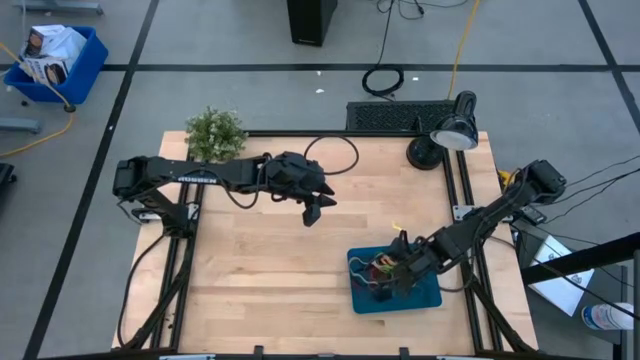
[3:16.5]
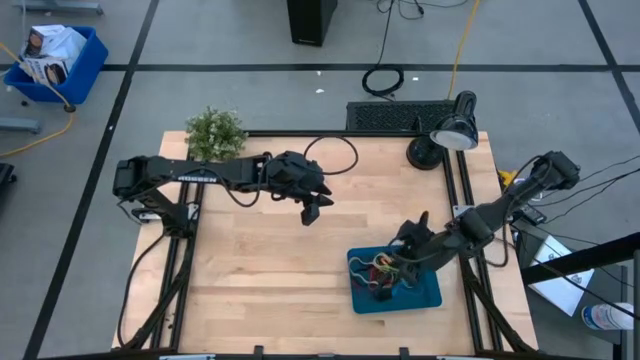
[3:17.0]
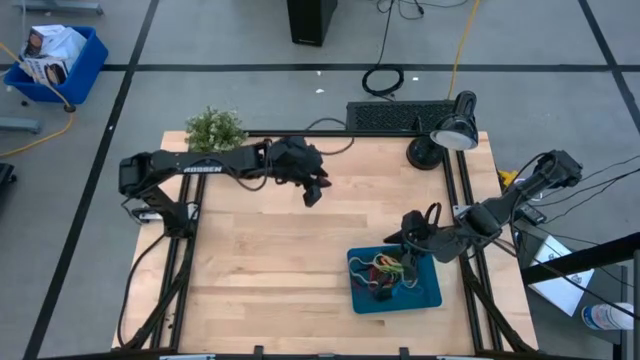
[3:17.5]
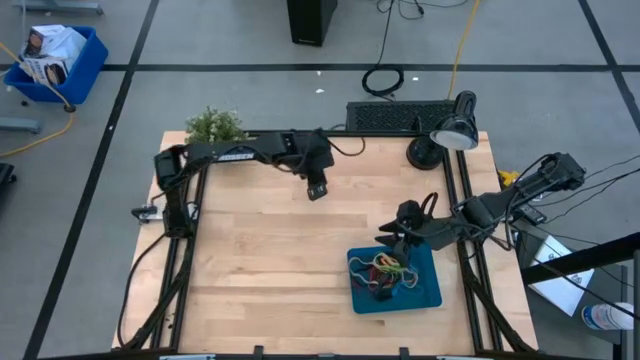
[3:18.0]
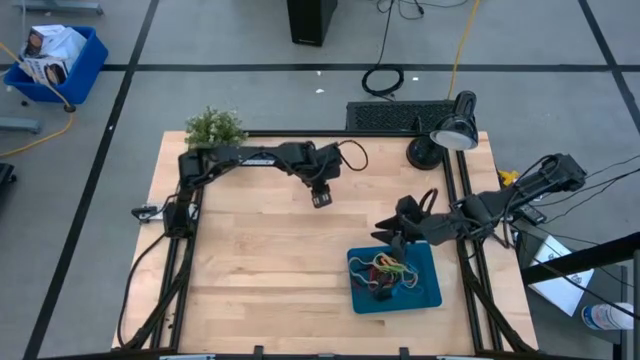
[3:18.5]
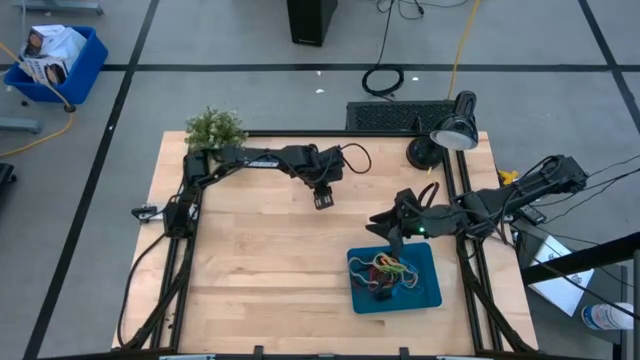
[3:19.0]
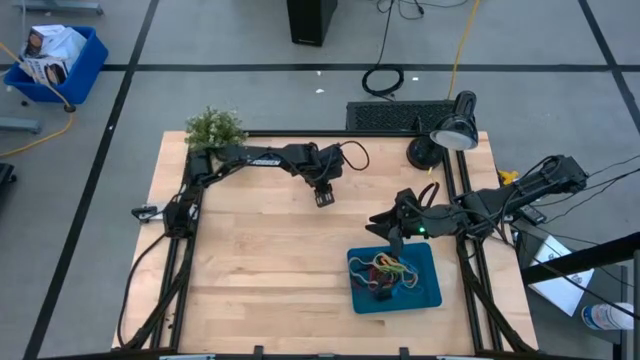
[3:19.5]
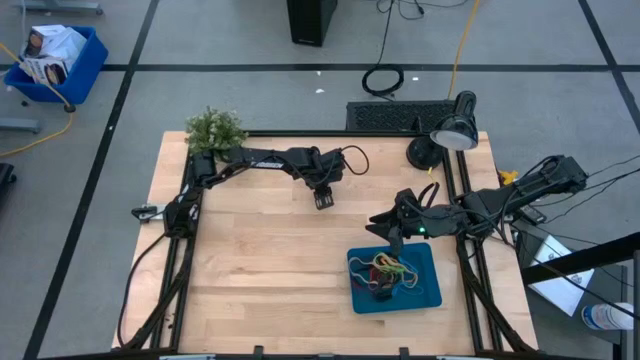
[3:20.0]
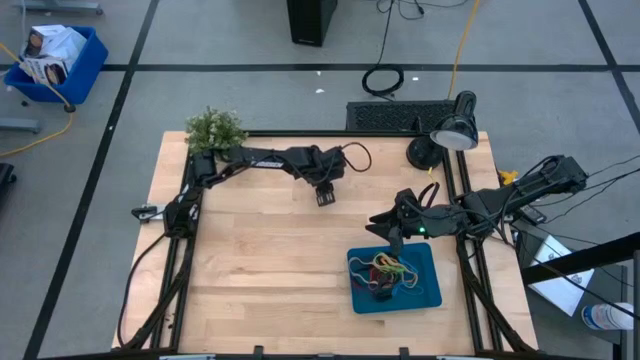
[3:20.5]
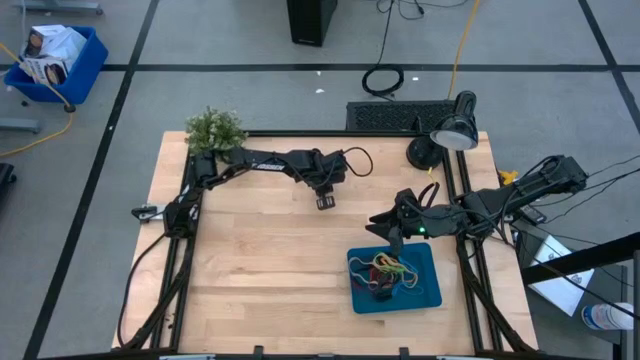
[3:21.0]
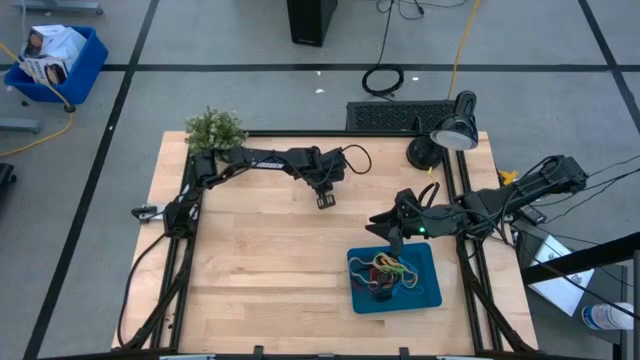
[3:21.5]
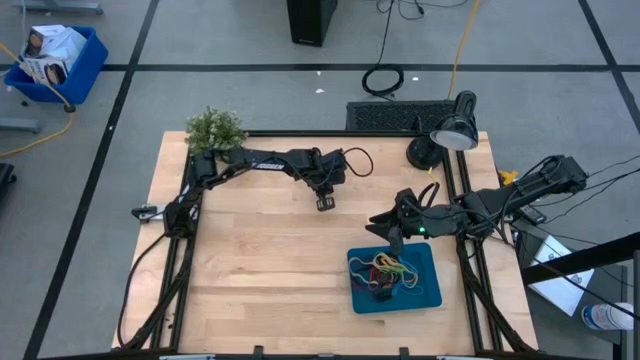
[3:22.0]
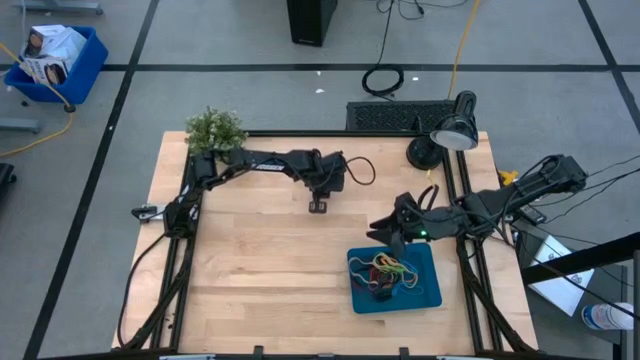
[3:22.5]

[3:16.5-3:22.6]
Task: Pick and place rubber bands into bin
Put the orange rubber band into the blue bin

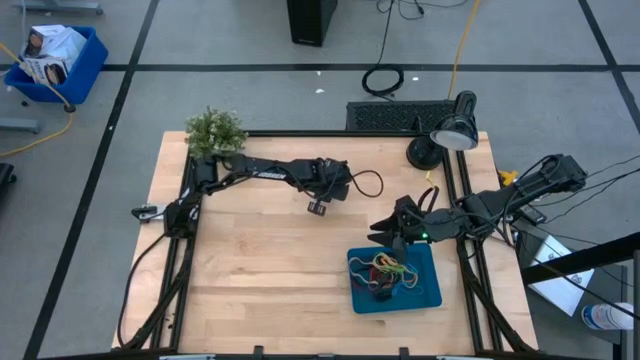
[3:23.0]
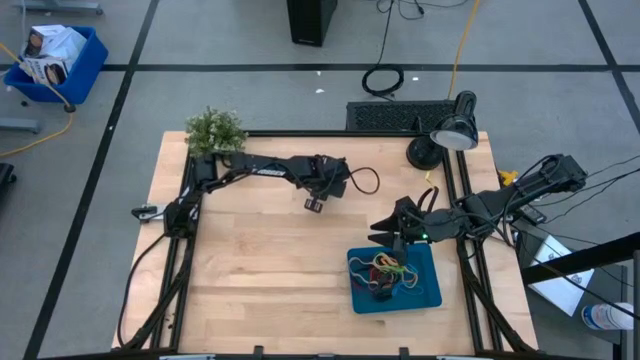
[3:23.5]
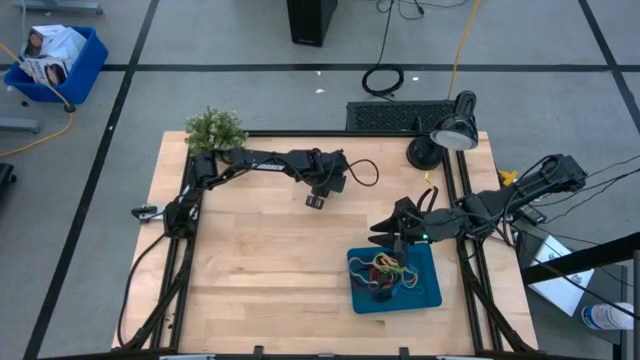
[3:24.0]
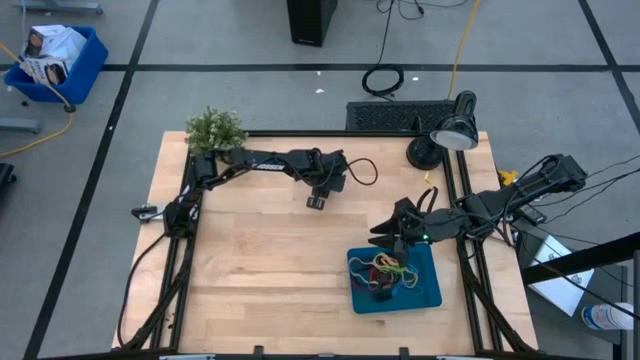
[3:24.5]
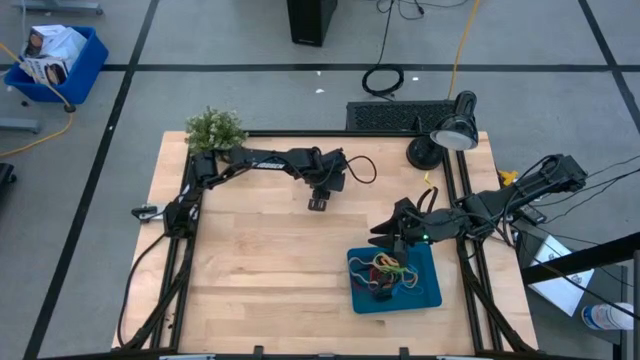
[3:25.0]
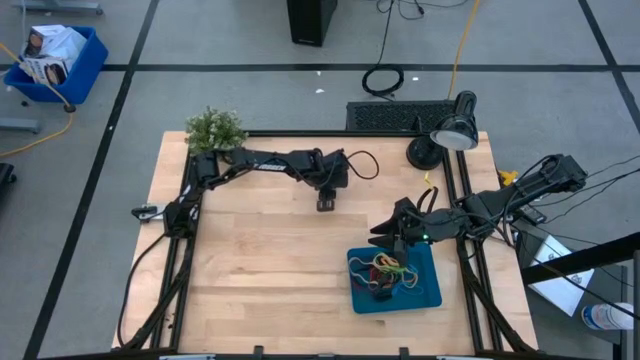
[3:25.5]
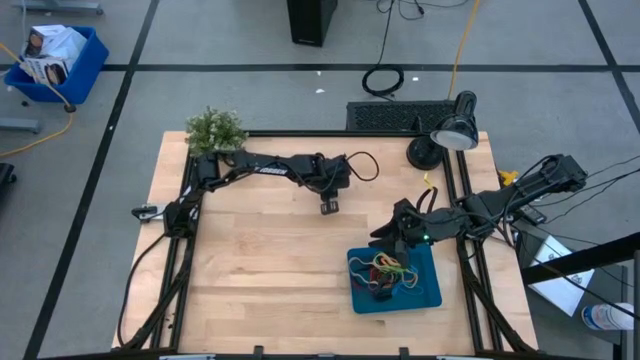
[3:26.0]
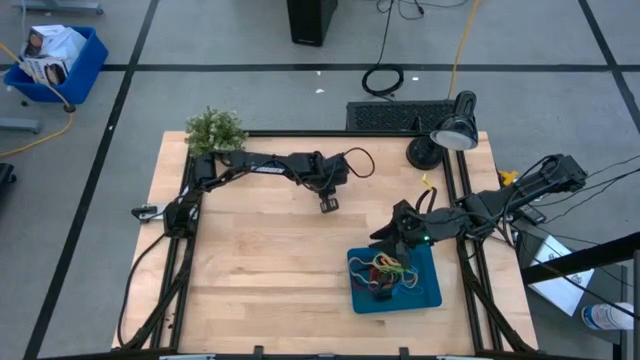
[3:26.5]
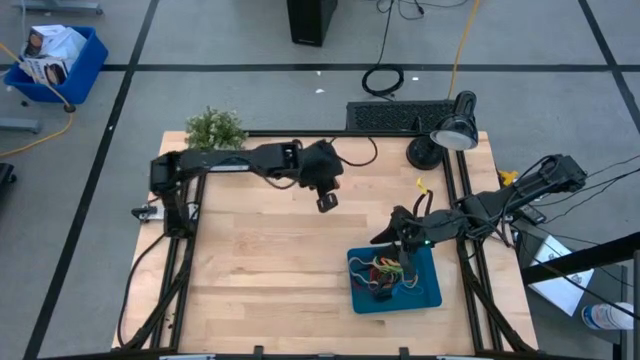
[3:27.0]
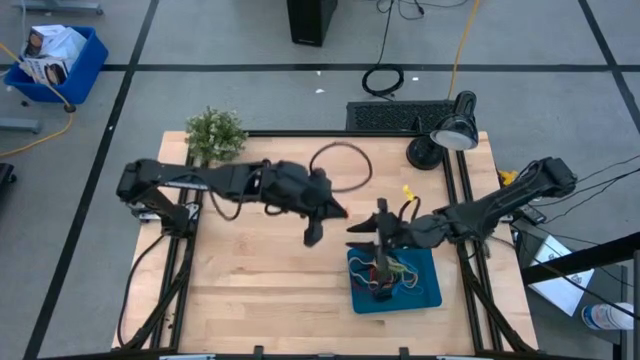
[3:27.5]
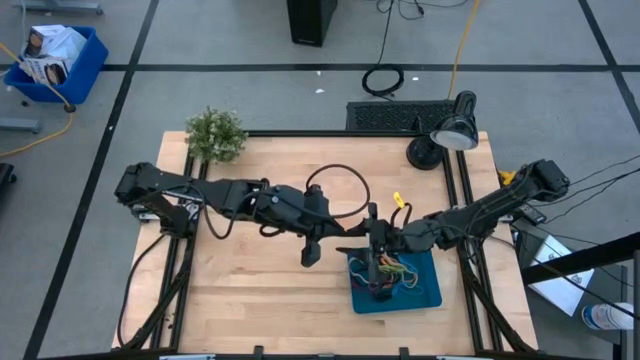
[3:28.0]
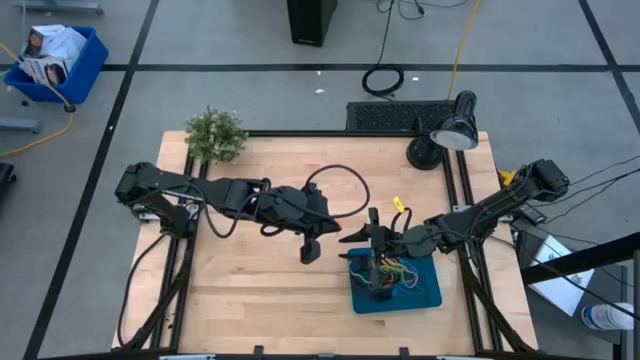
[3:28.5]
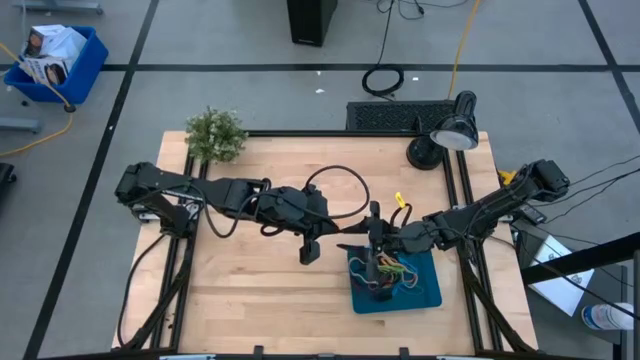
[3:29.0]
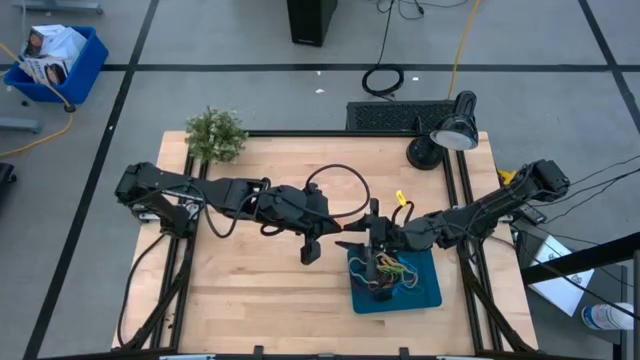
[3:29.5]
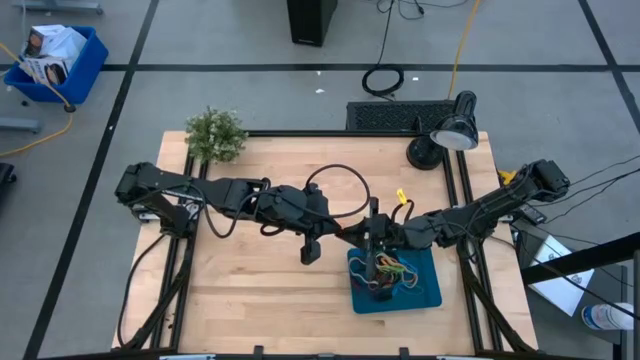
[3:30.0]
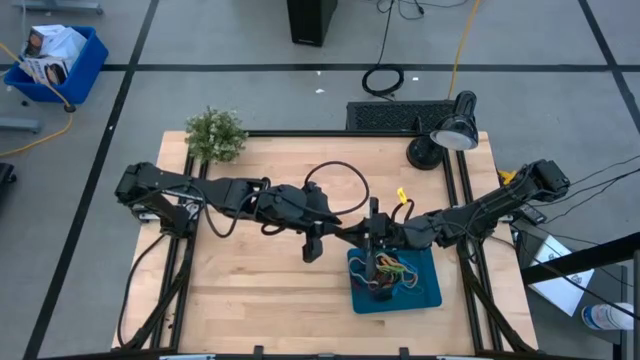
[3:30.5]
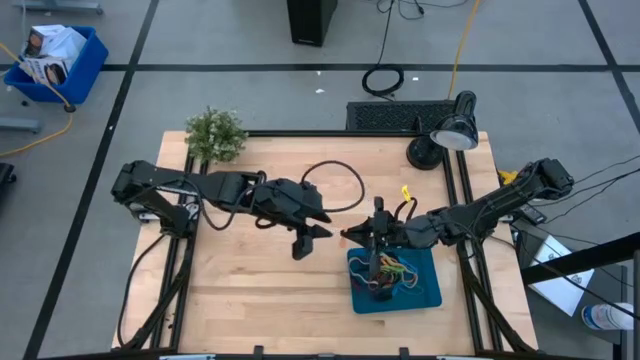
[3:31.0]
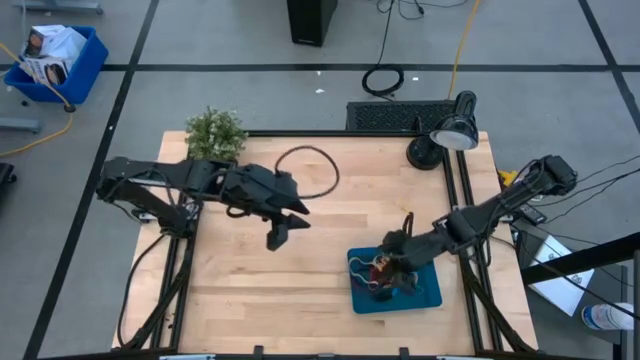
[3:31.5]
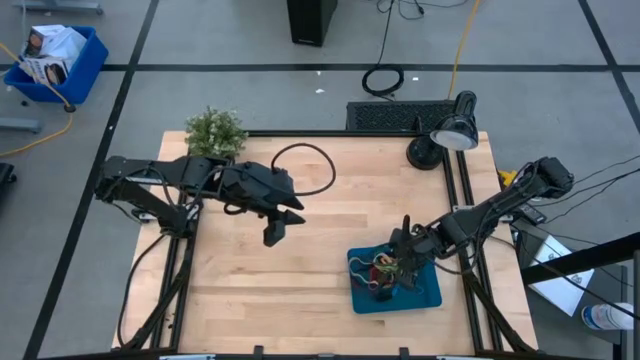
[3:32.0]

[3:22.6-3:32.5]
Put the orange rubber band into the blue bin

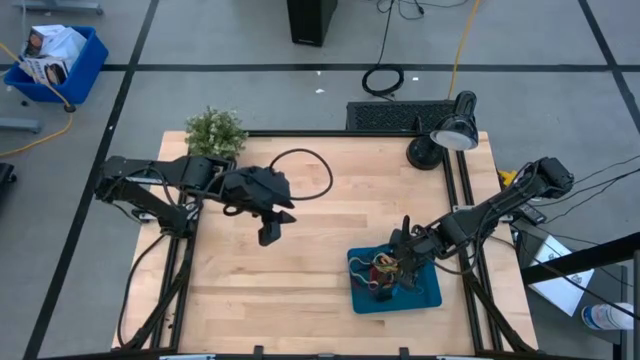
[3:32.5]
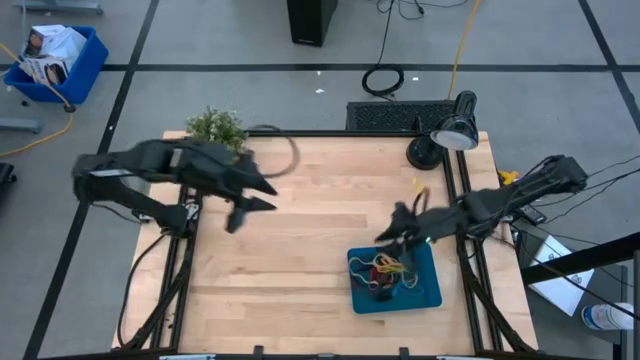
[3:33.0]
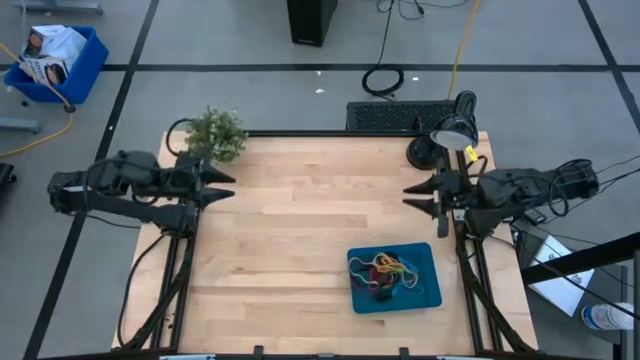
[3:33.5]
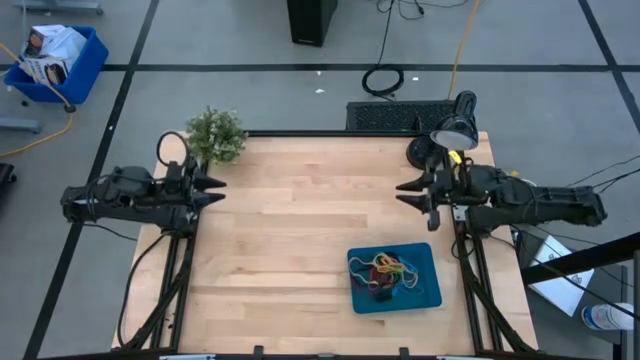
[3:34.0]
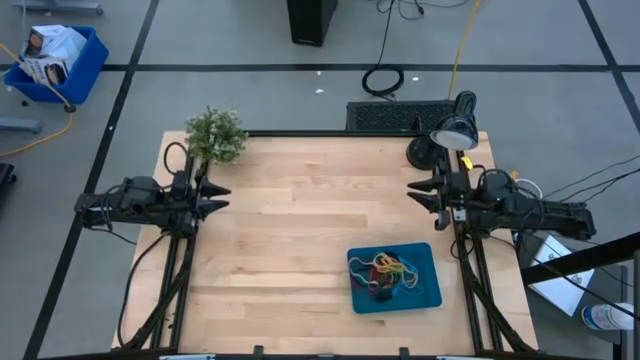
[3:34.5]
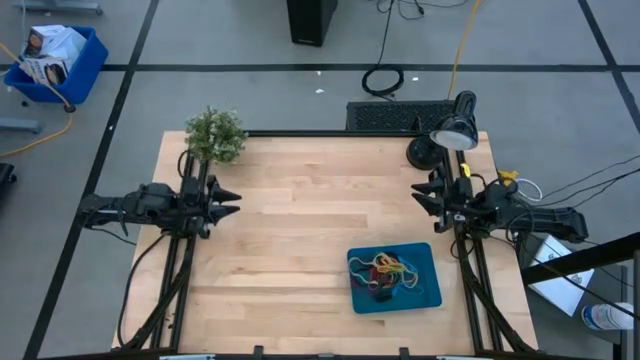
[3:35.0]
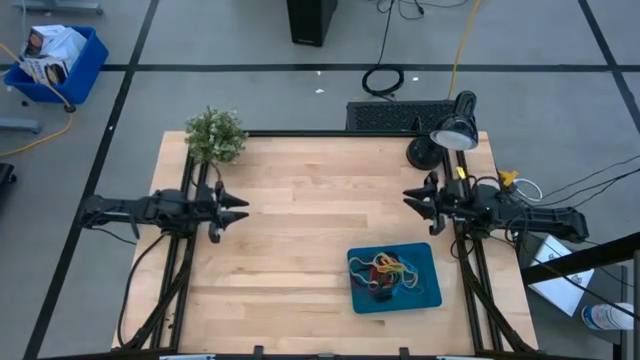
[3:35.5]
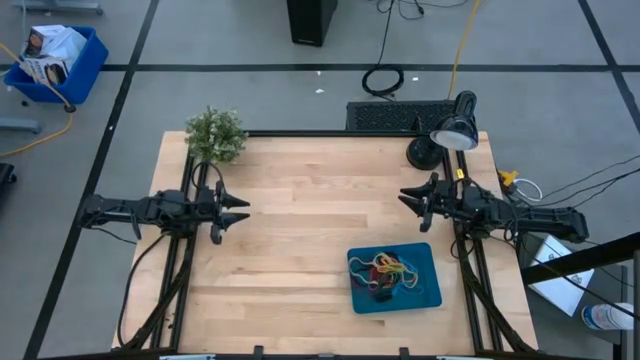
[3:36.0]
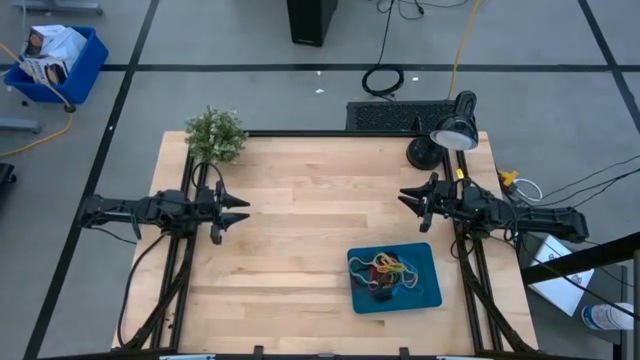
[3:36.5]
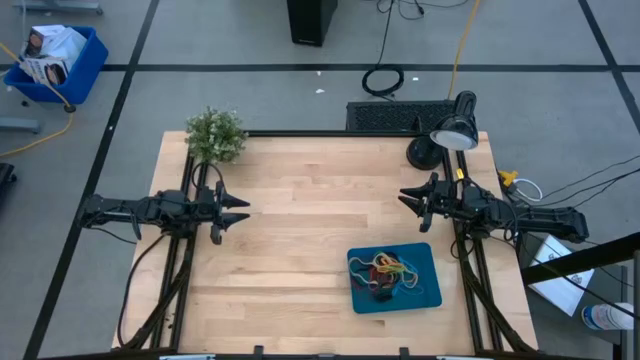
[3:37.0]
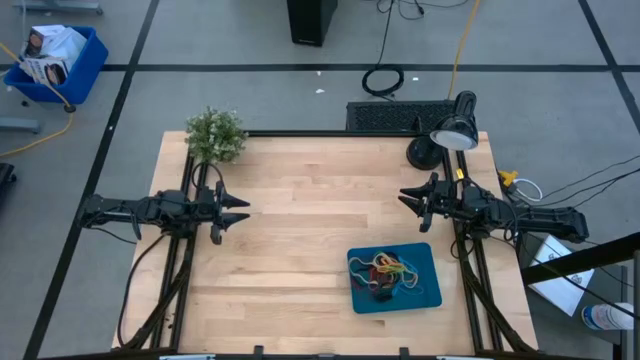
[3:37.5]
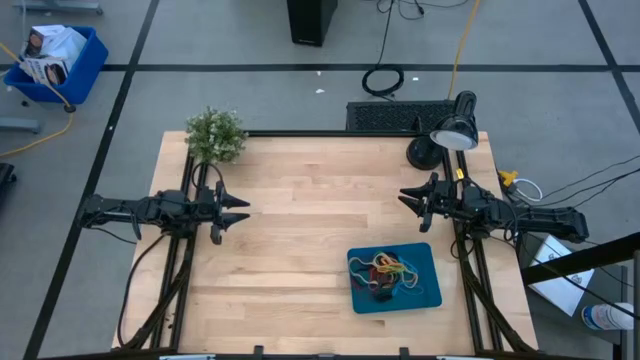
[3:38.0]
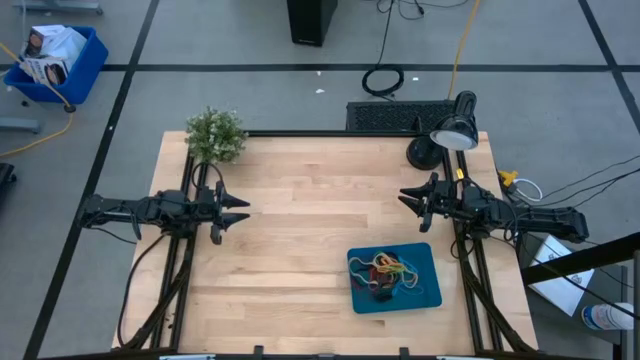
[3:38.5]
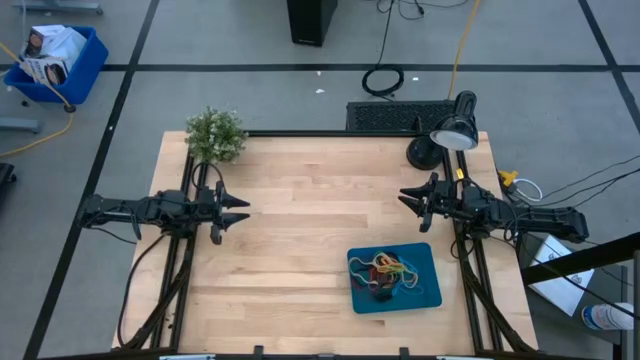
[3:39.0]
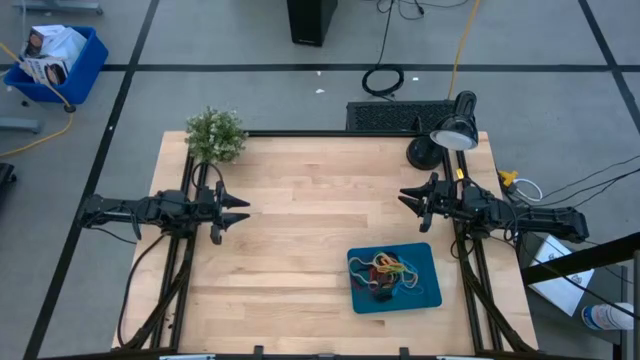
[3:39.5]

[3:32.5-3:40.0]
Return to Home Position
